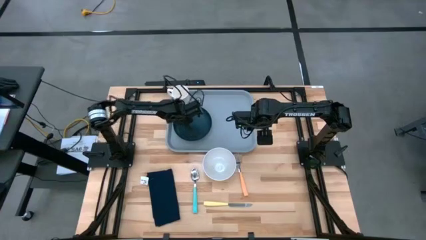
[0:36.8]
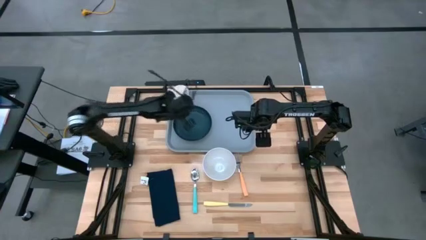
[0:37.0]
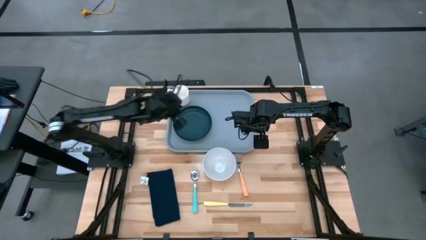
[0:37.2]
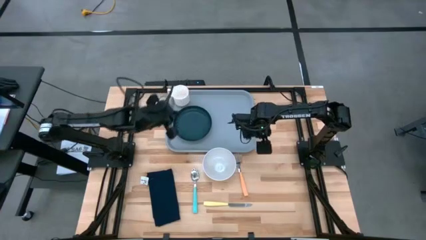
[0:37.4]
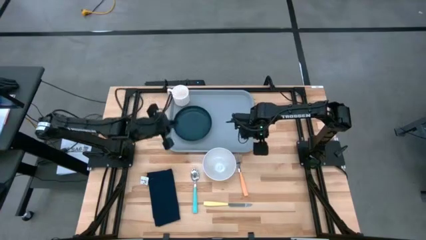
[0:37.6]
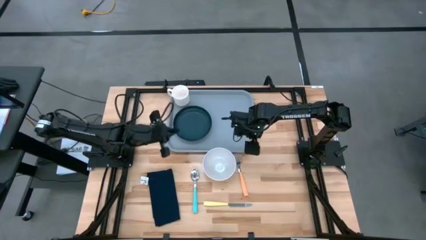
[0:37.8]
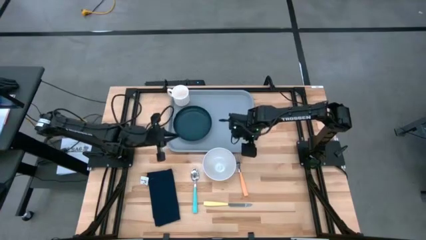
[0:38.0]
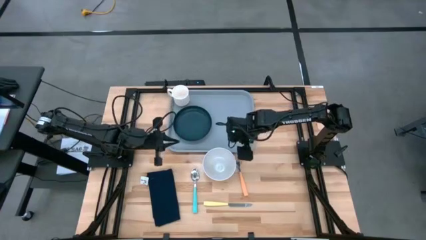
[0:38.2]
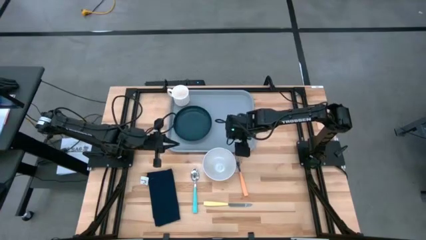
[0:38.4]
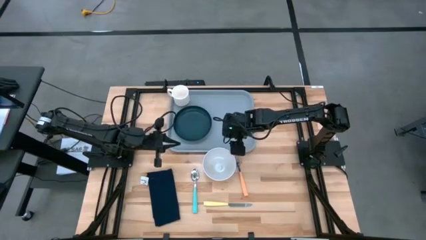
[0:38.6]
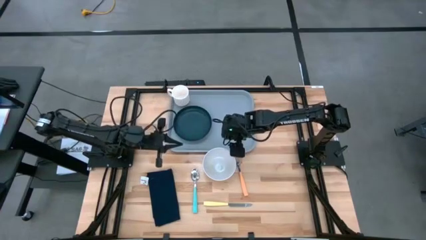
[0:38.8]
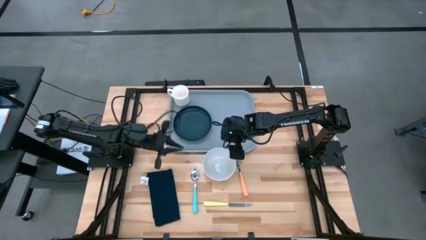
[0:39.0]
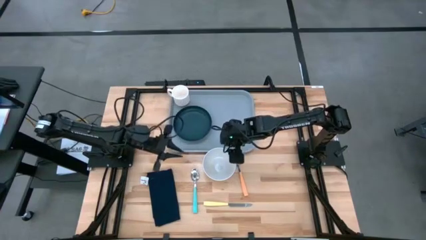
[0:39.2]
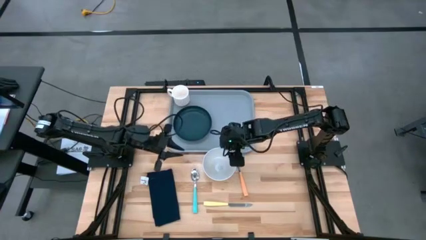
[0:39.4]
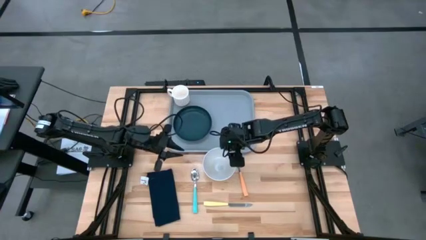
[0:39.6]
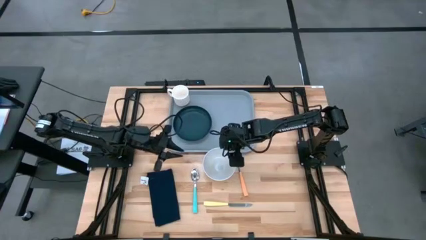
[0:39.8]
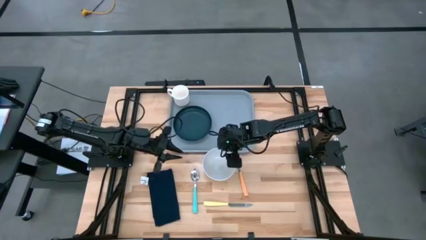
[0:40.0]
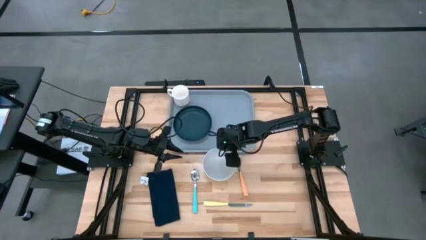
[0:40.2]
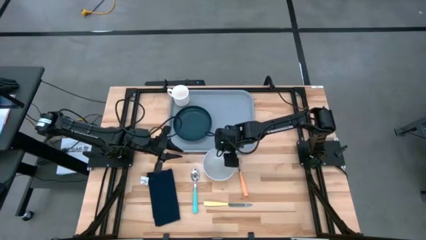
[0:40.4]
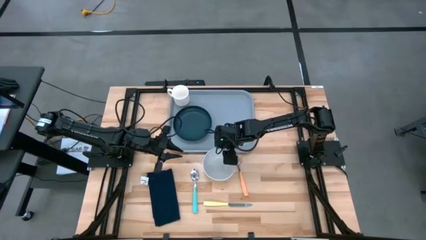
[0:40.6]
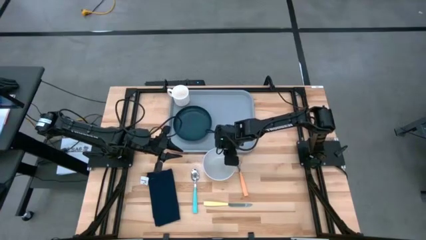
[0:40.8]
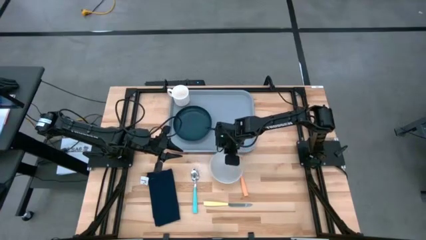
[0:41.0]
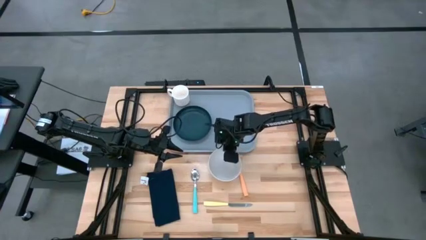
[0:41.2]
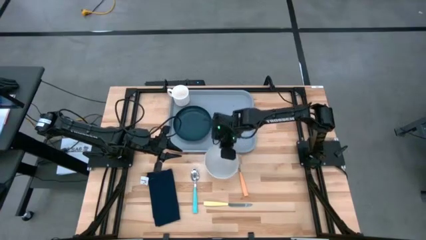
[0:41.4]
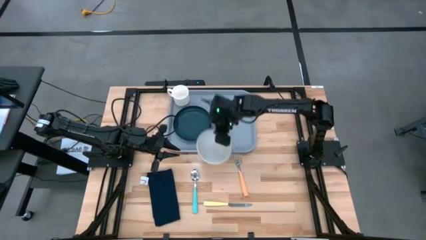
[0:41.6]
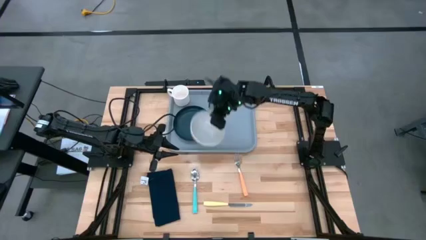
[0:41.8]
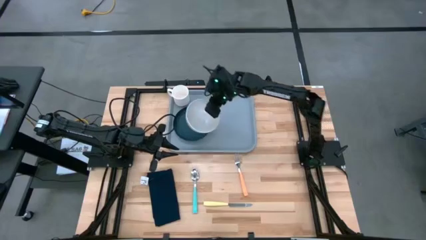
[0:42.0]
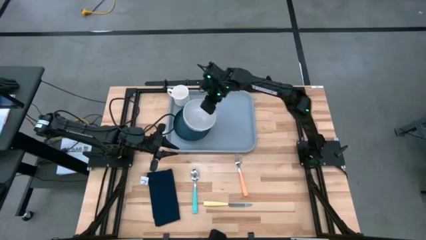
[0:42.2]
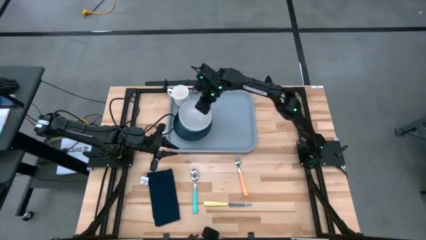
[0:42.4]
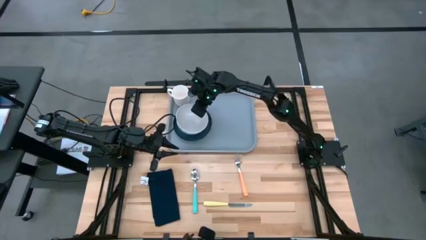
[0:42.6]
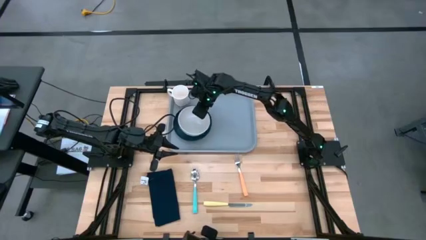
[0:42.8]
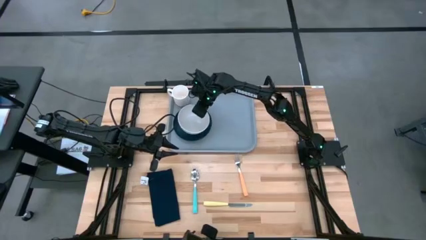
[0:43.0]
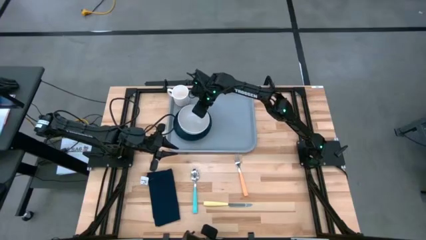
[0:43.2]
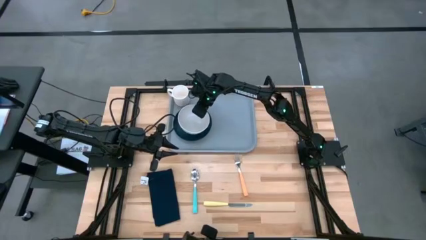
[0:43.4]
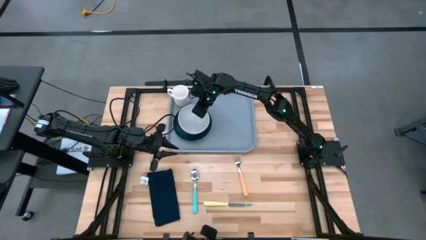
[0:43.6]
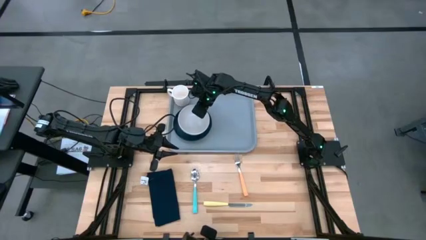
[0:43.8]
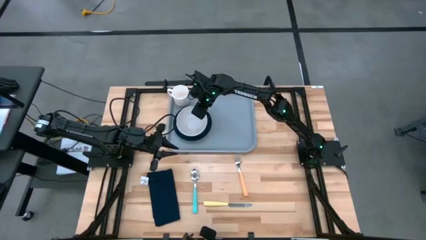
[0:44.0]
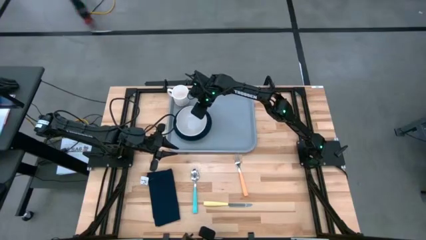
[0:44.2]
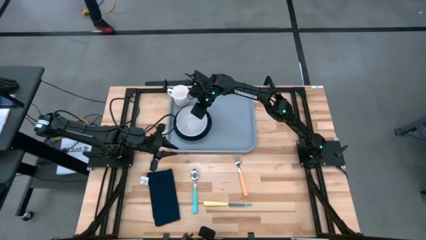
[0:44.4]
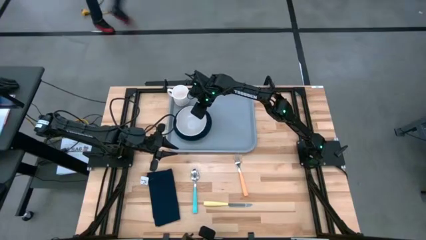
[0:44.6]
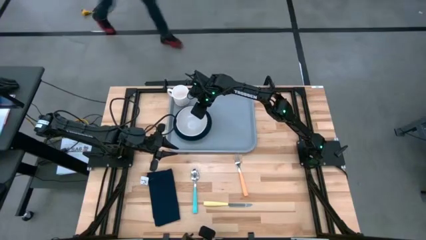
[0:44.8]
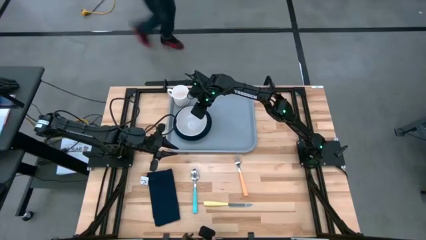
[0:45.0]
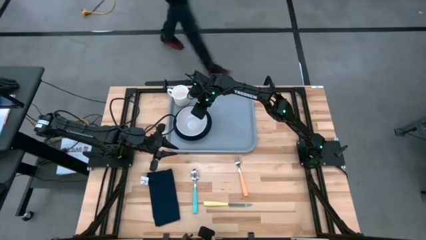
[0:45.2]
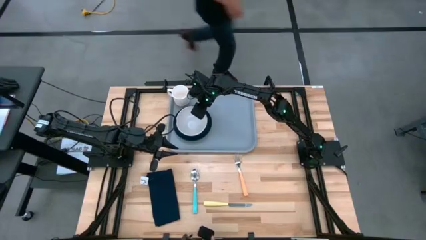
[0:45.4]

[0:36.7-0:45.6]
Task: Set up tray
Put the white bowl on the green plate

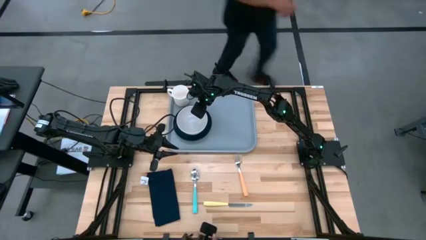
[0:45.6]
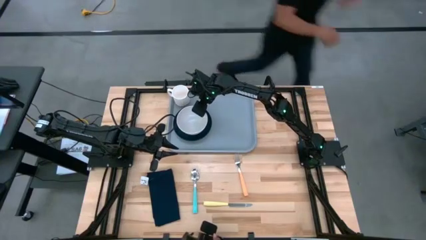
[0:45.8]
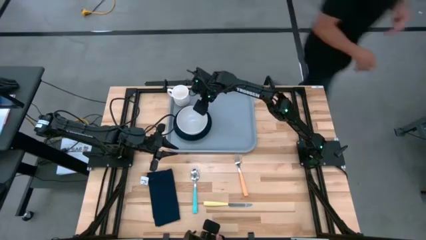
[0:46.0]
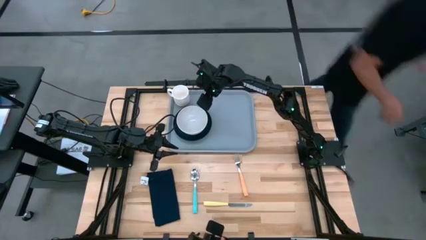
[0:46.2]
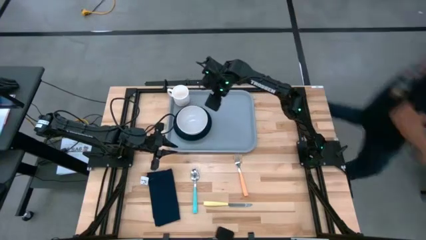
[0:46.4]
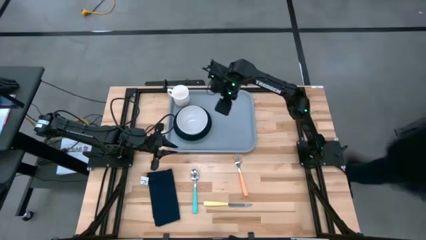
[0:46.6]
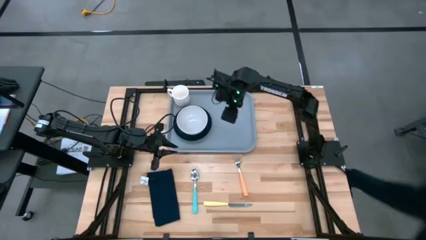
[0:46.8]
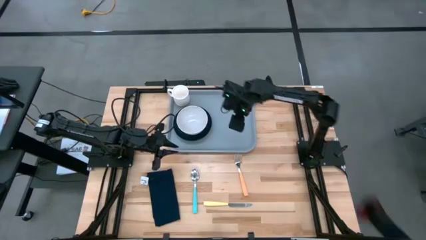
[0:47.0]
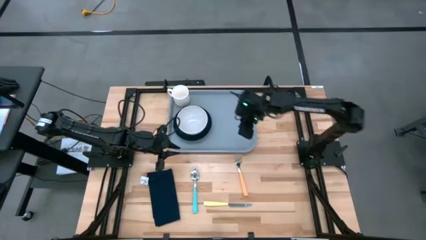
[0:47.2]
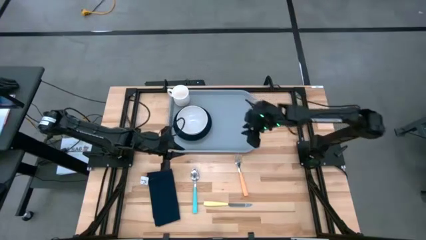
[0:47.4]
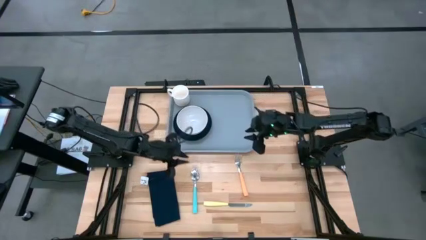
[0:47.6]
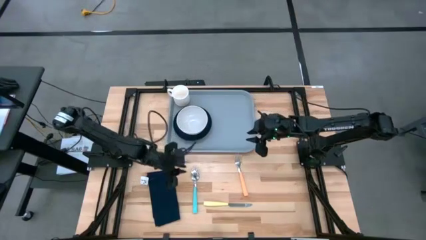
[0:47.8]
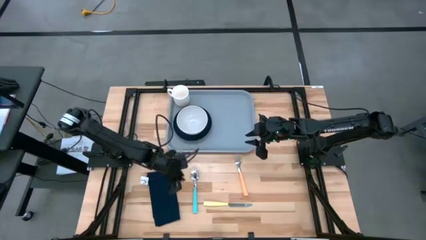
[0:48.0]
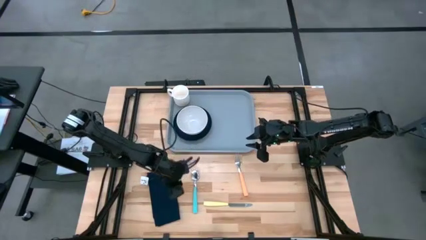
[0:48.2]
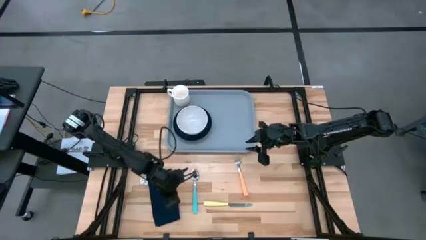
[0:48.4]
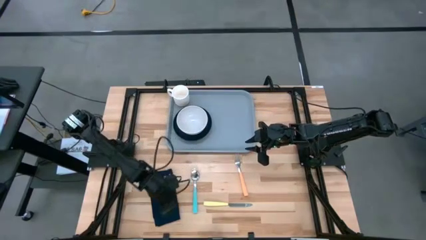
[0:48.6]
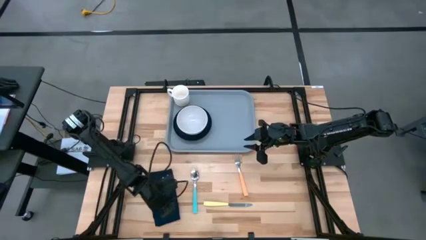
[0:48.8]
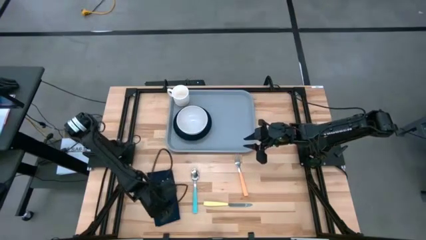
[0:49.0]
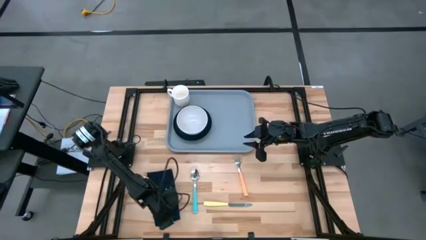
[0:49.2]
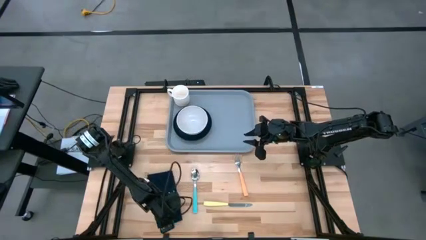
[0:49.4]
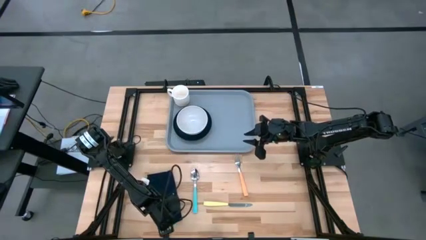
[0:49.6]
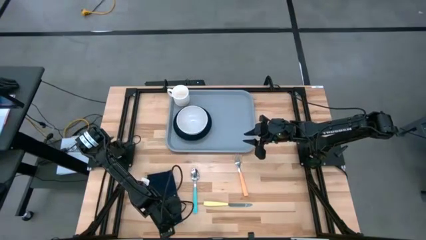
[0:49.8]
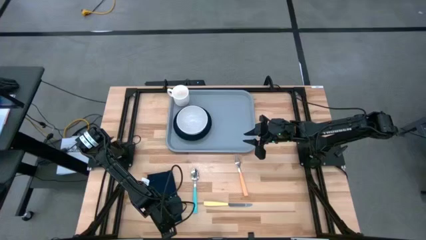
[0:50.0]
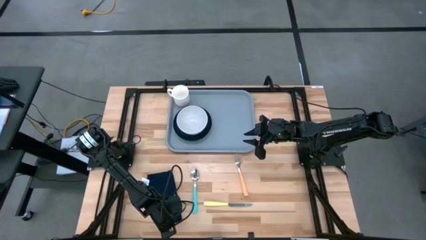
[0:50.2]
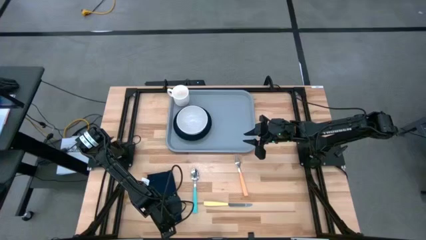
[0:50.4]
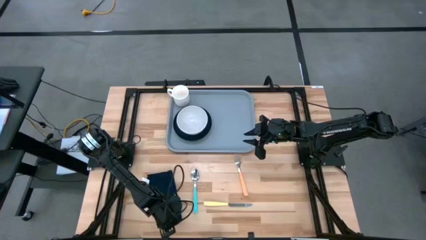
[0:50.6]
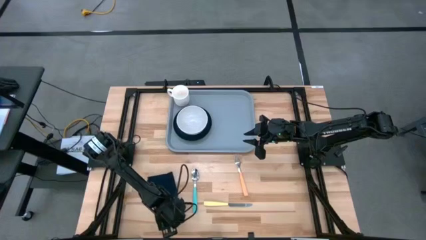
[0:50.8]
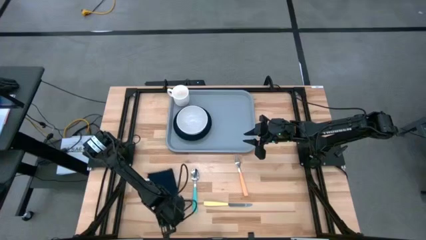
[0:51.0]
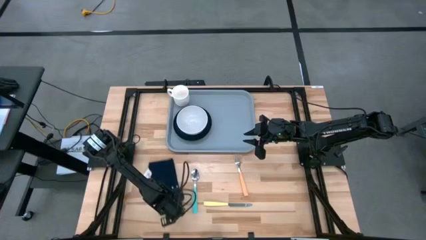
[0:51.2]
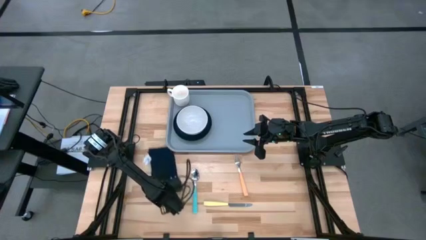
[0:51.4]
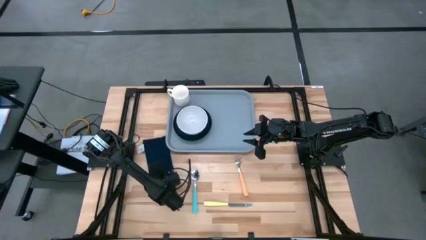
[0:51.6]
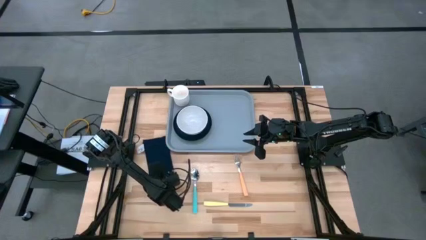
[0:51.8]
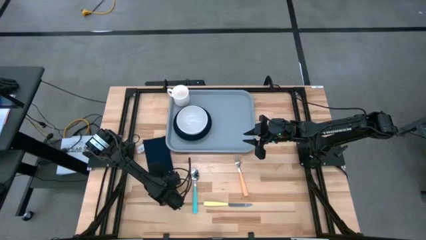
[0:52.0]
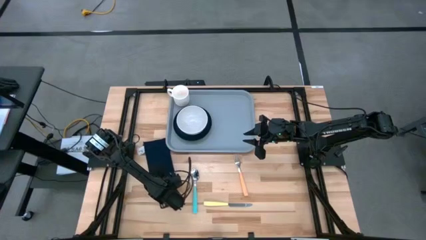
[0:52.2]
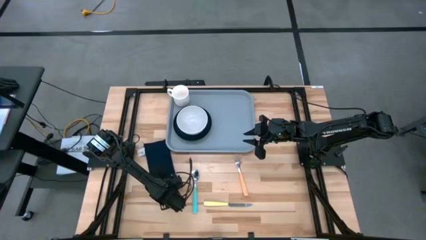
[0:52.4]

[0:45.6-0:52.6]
Put the blue napkin on the gray serving tray to the right of the green plate
